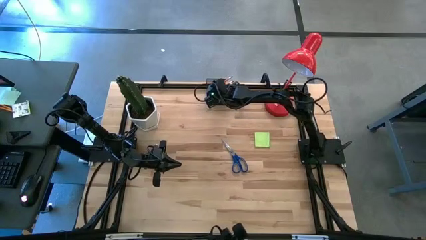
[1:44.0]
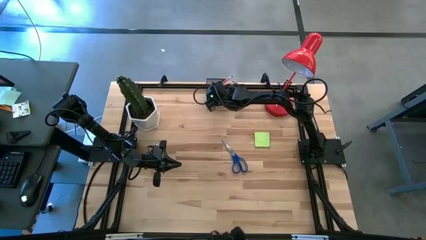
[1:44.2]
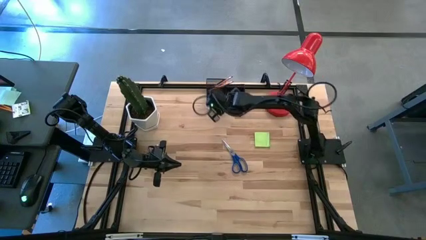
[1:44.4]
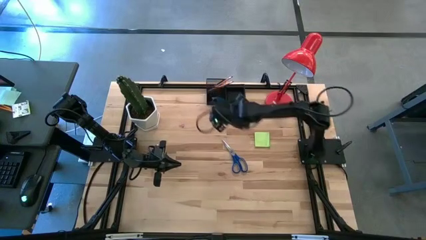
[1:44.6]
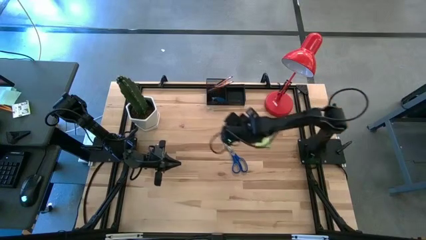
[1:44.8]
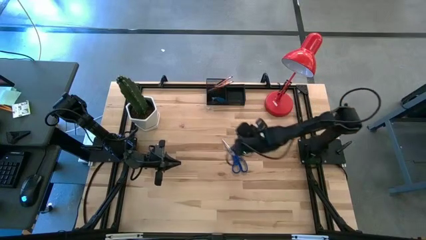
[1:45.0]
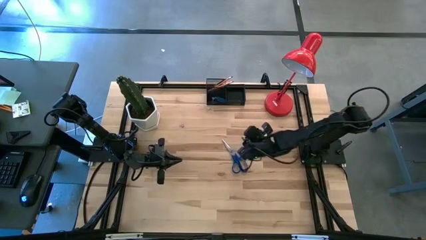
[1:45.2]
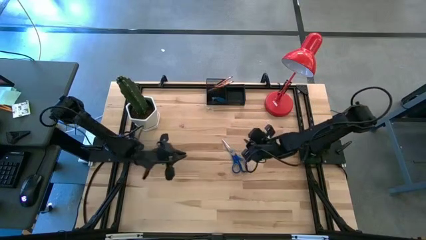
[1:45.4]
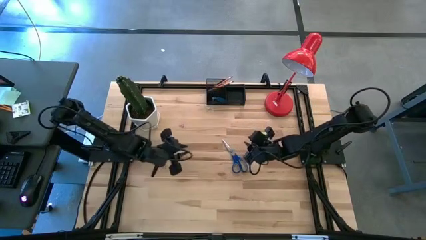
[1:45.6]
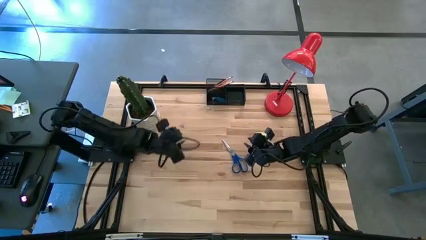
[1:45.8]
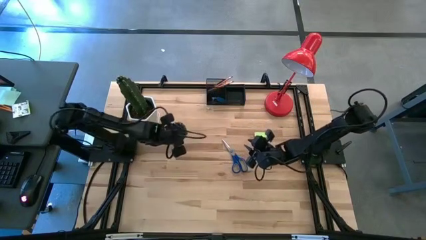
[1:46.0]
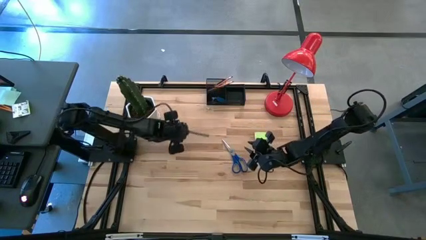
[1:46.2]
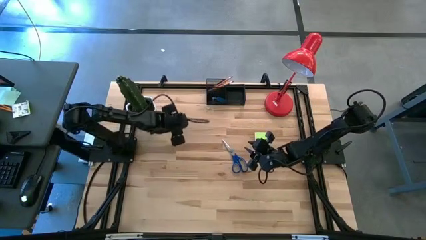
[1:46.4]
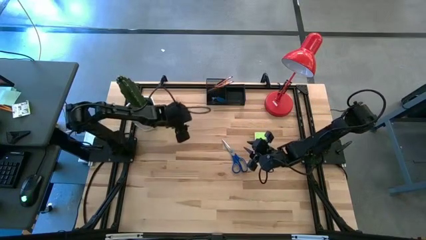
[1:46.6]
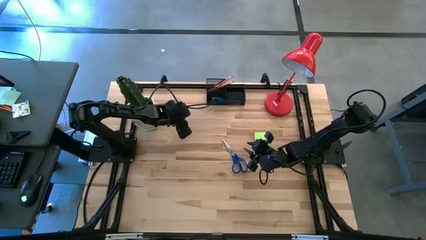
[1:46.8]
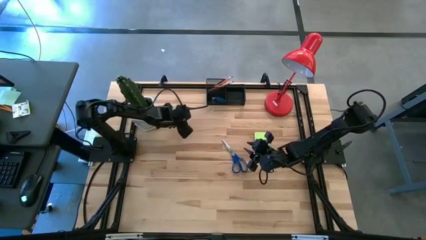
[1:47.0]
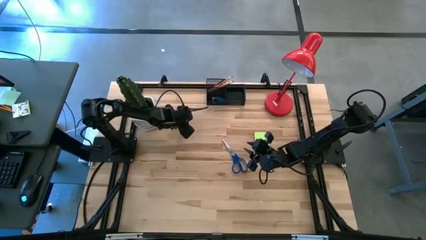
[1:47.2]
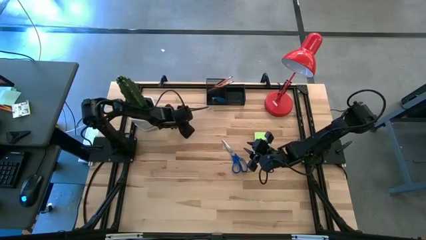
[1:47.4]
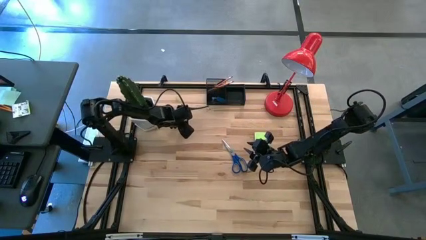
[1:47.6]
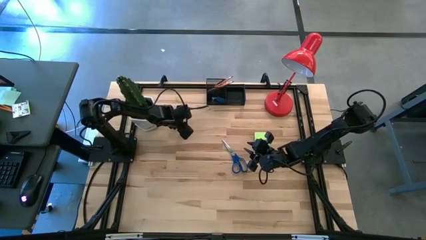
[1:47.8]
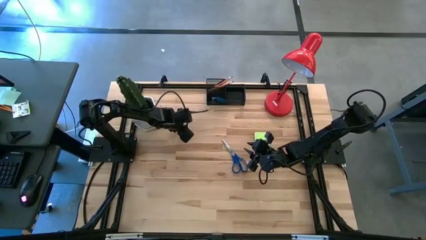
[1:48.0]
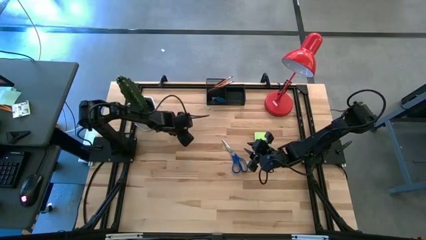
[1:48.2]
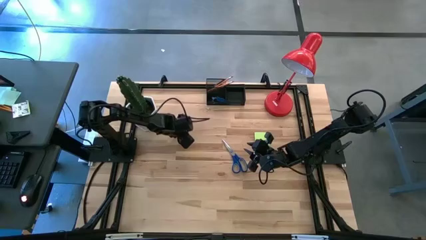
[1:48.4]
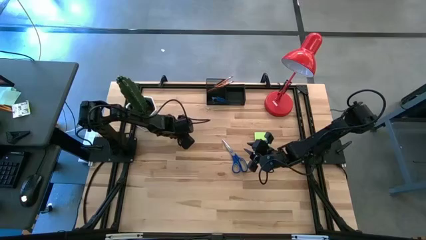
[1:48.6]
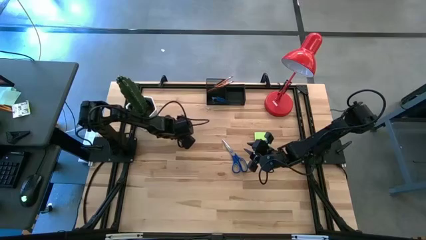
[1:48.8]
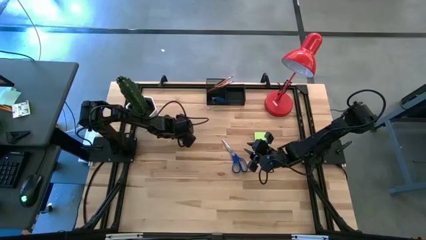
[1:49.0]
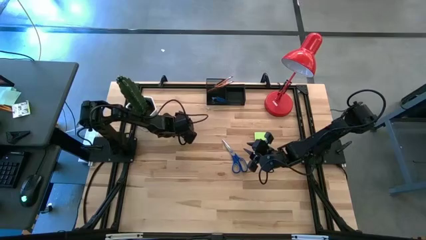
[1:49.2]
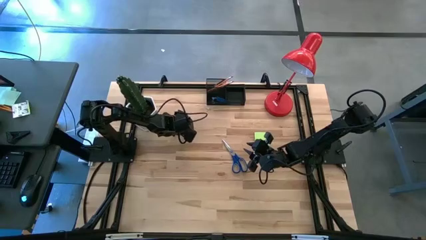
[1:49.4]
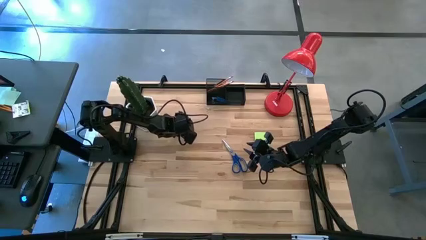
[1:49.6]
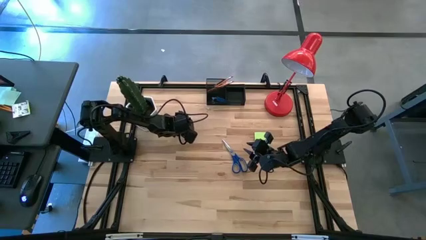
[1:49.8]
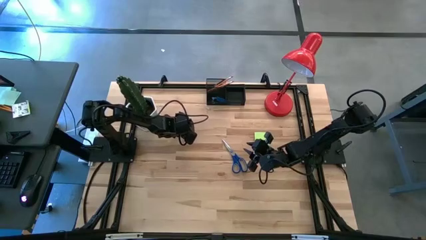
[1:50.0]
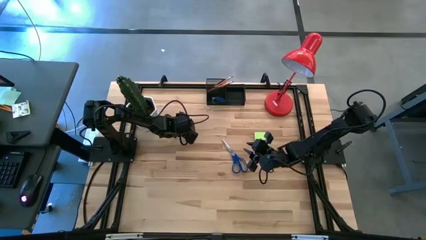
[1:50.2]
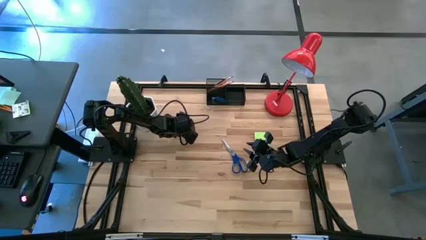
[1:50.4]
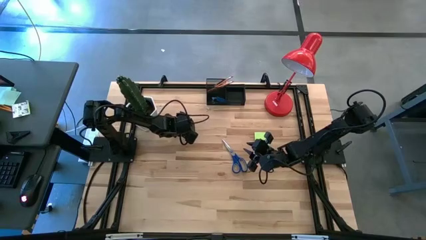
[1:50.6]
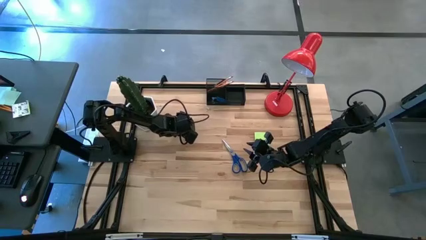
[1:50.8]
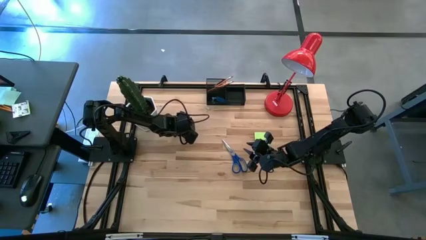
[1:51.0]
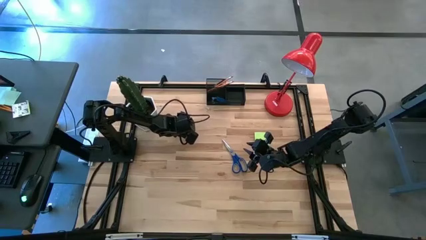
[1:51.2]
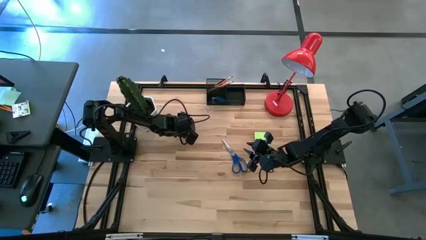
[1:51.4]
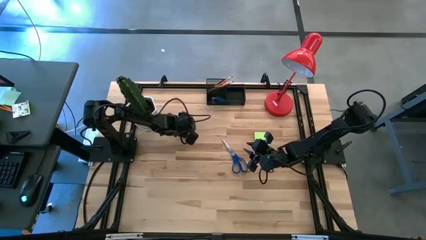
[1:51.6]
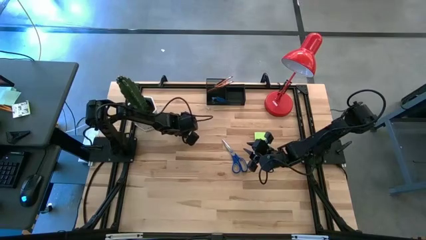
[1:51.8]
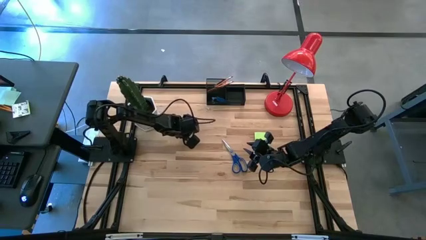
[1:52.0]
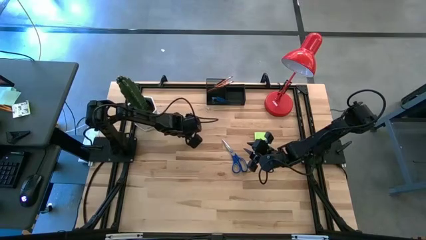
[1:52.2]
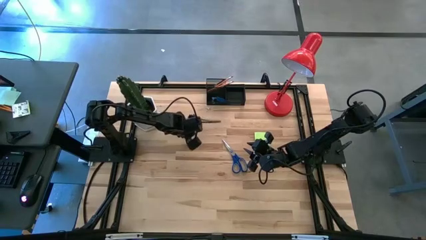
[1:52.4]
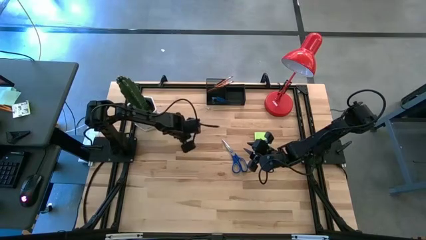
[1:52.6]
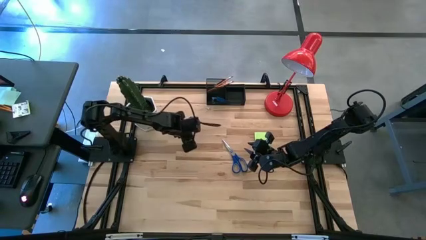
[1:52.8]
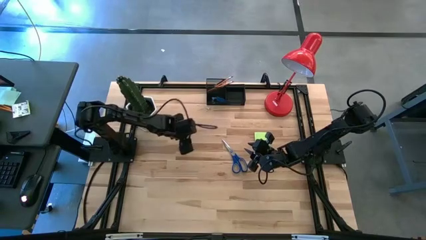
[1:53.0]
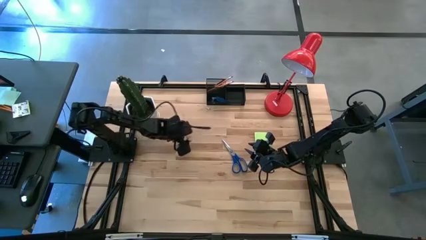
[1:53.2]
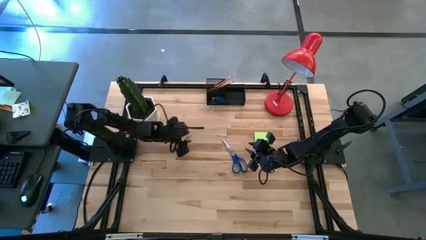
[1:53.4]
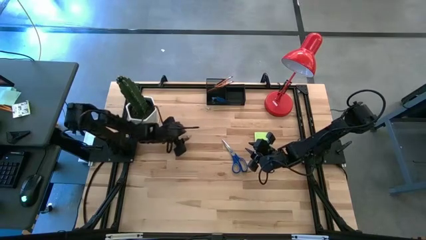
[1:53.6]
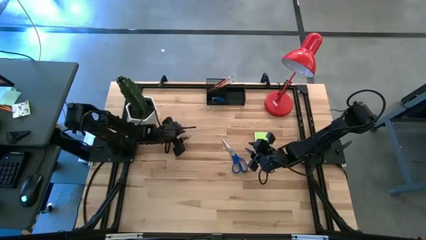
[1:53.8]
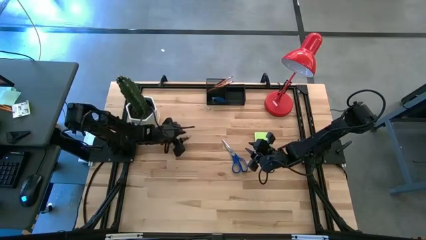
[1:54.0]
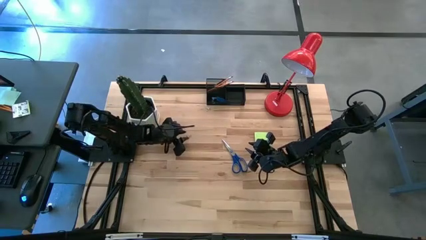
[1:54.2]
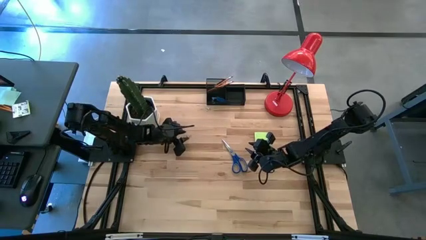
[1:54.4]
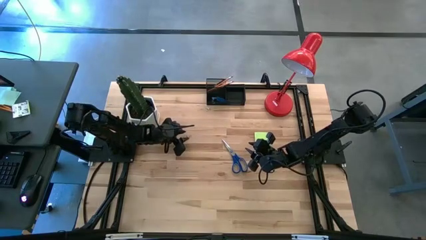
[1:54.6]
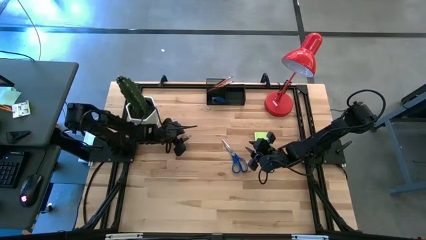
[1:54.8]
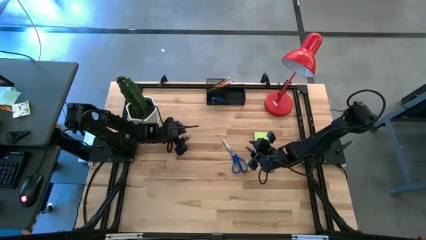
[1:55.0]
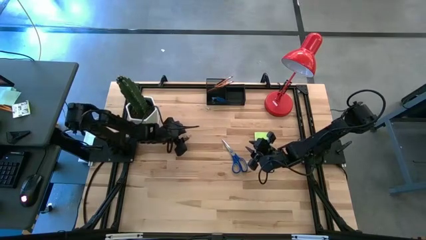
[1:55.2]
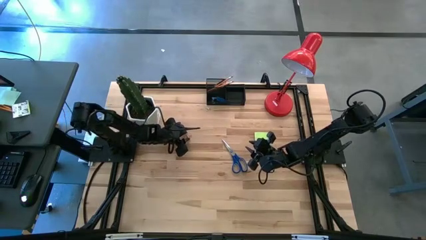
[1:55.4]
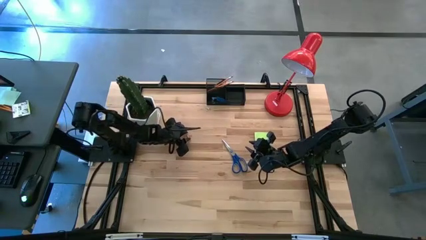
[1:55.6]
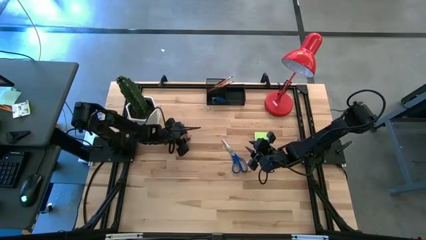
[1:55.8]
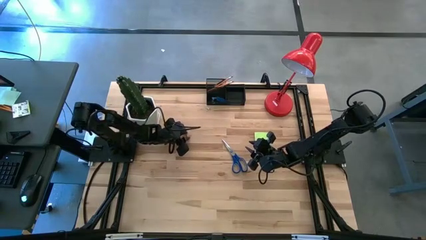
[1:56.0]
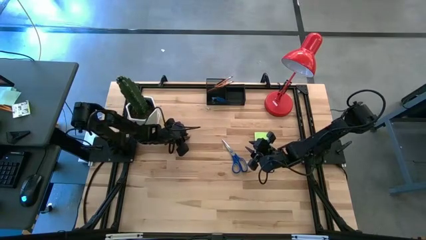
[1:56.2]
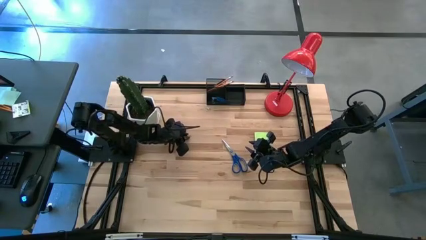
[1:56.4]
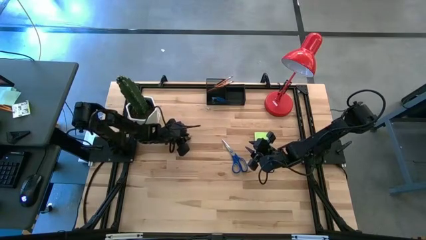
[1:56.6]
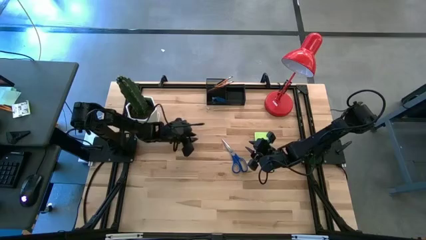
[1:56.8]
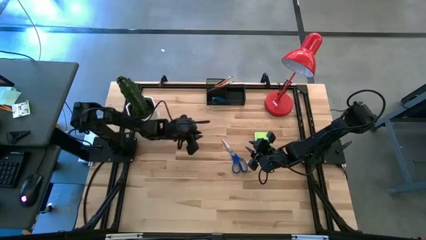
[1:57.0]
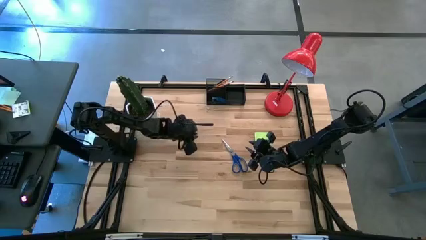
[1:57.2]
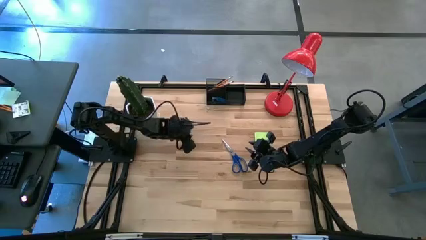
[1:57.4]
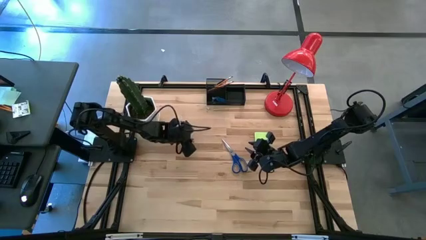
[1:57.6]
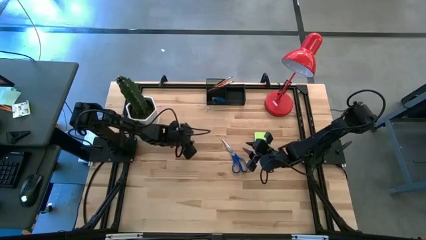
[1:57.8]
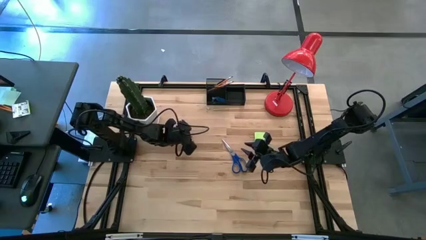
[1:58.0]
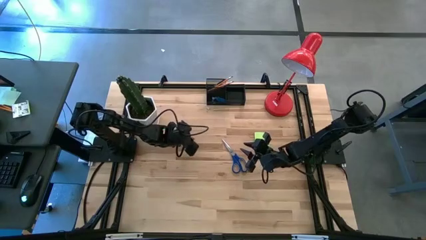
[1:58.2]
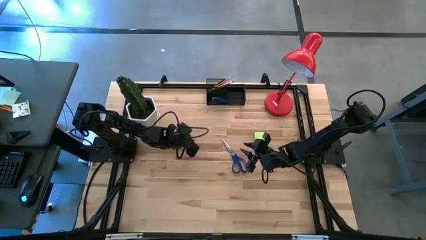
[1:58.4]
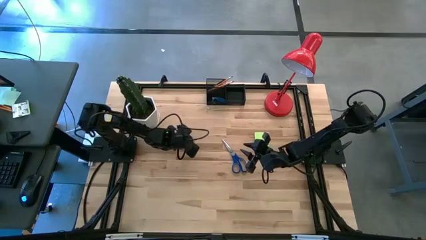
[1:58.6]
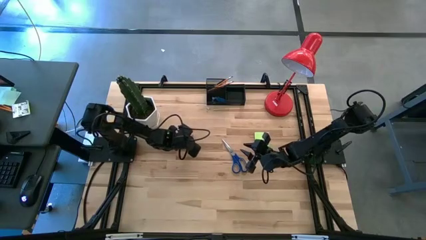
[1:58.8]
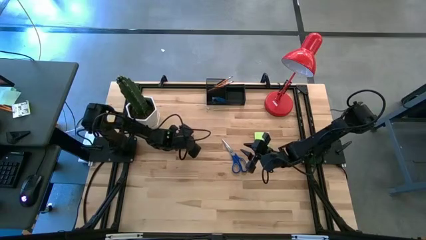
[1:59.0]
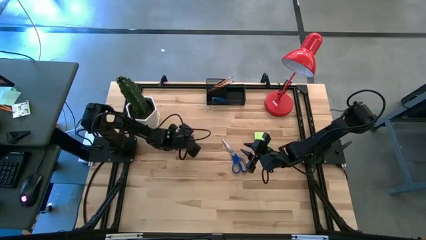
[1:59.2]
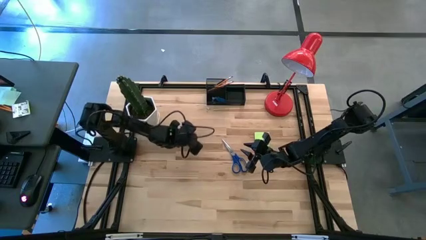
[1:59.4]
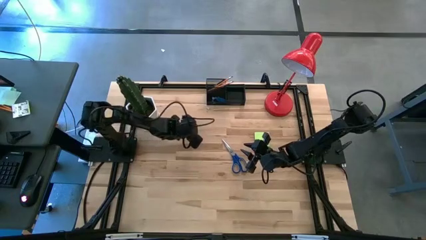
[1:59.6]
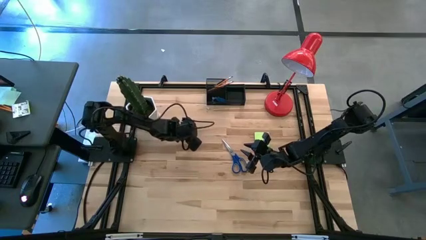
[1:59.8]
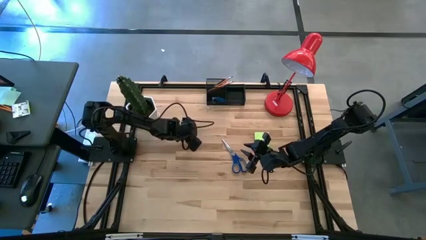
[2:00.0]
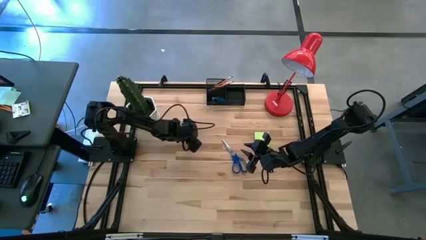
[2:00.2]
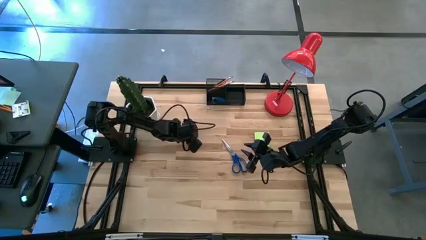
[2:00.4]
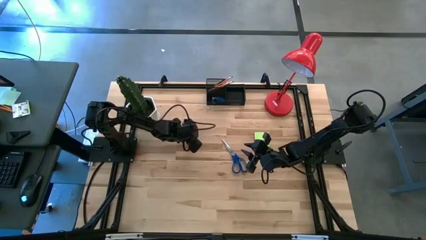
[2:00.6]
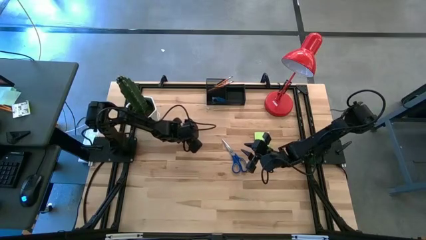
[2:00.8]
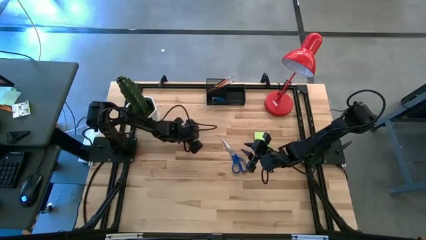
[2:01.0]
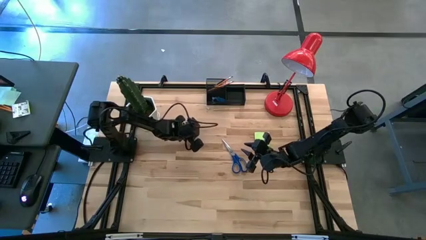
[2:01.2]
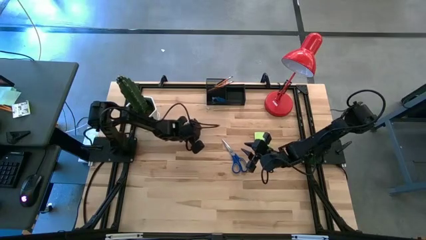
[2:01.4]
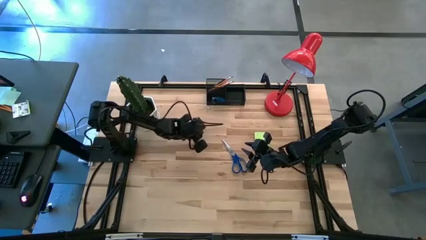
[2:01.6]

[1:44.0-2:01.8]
Task: Pick and place office supplies into organizer
Put the pink binder clip into the bottom left section of the desk organizer
